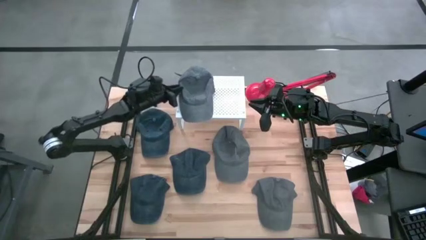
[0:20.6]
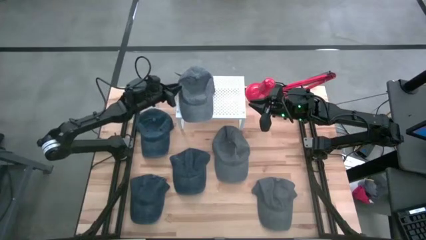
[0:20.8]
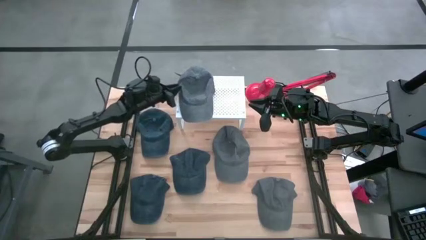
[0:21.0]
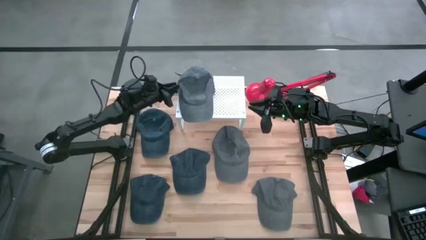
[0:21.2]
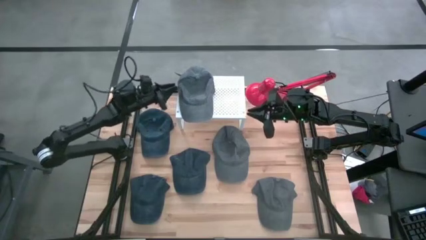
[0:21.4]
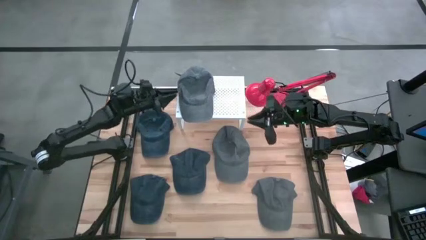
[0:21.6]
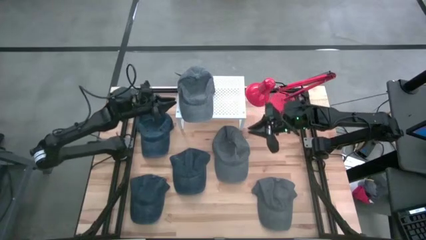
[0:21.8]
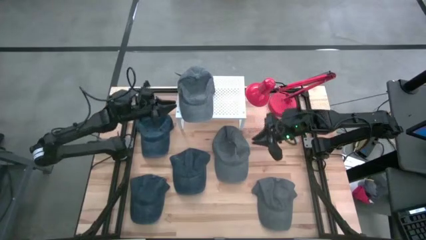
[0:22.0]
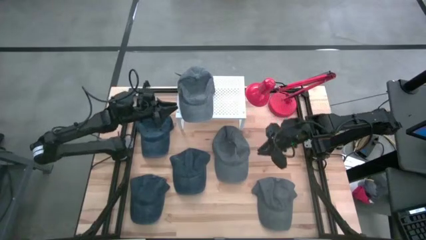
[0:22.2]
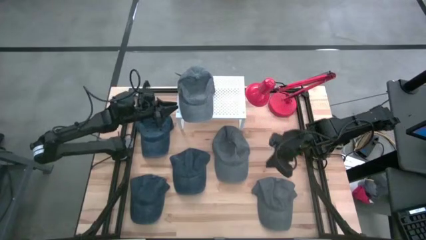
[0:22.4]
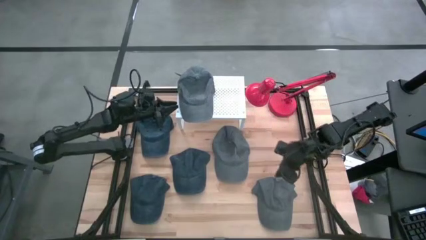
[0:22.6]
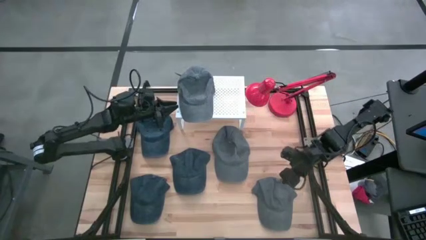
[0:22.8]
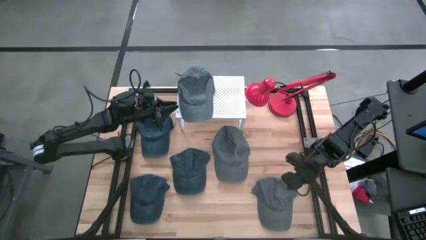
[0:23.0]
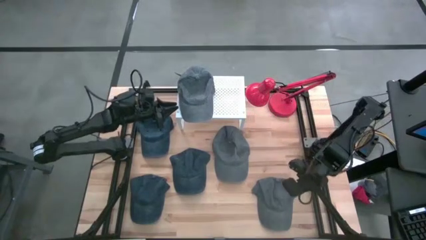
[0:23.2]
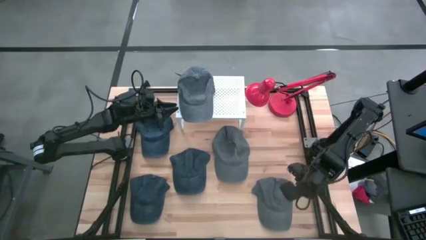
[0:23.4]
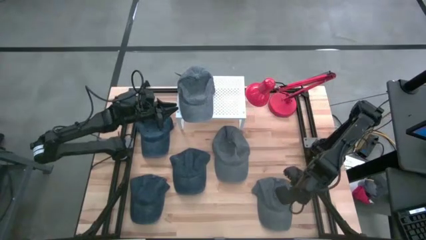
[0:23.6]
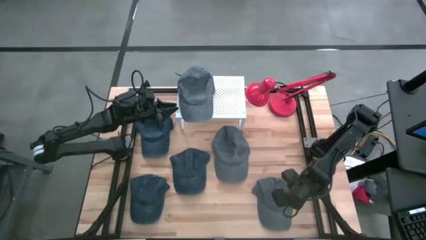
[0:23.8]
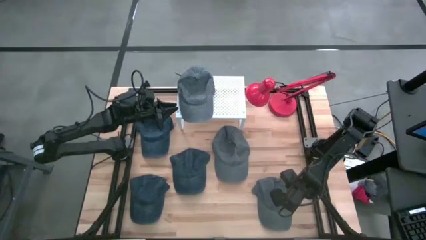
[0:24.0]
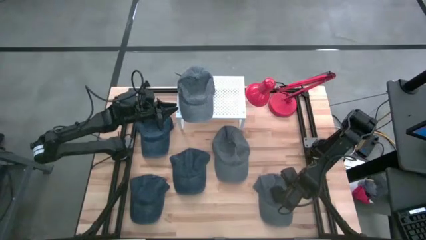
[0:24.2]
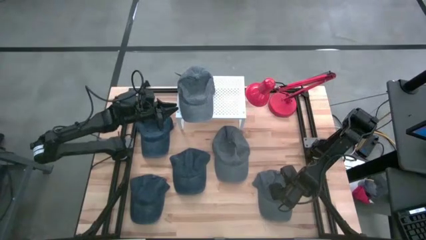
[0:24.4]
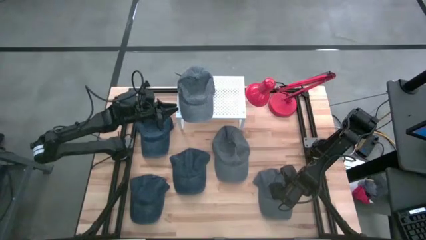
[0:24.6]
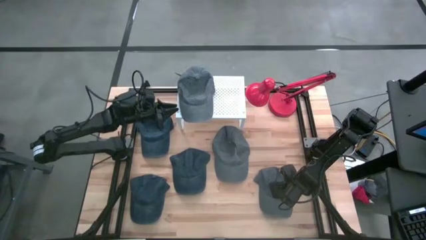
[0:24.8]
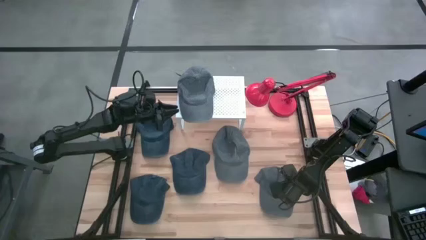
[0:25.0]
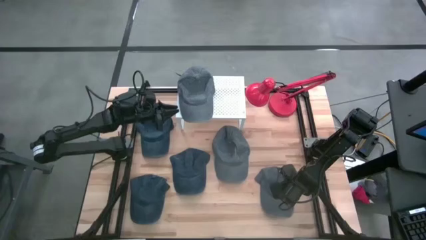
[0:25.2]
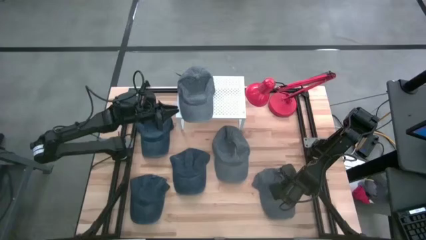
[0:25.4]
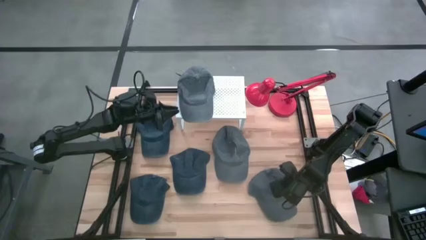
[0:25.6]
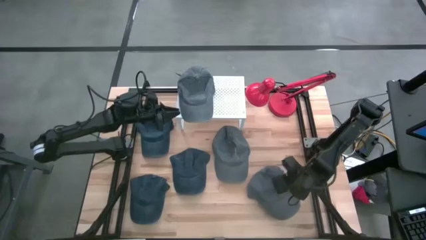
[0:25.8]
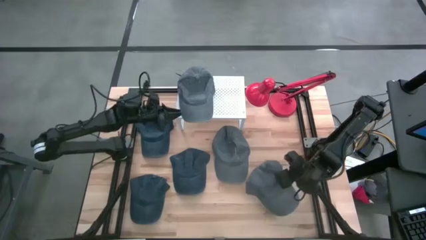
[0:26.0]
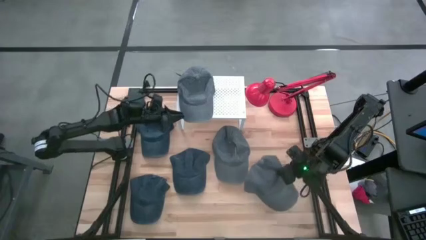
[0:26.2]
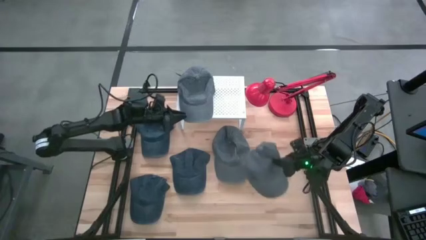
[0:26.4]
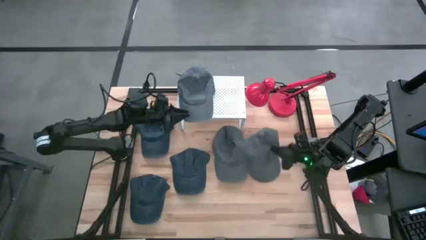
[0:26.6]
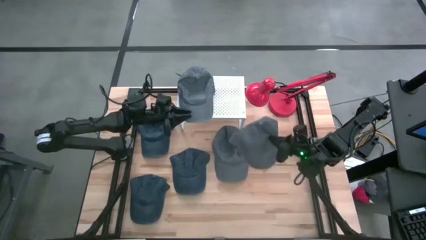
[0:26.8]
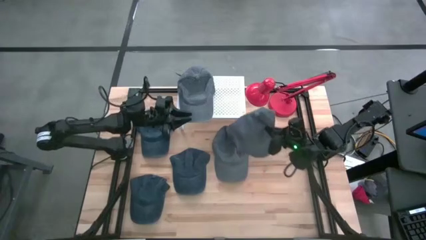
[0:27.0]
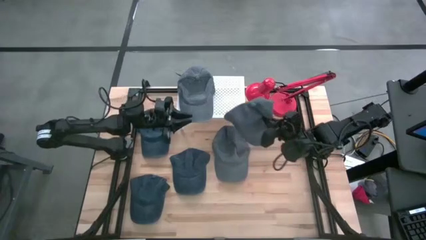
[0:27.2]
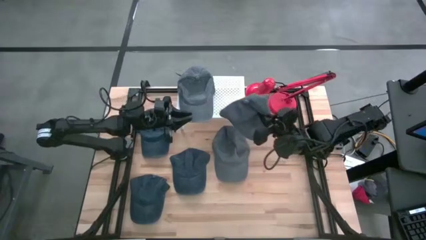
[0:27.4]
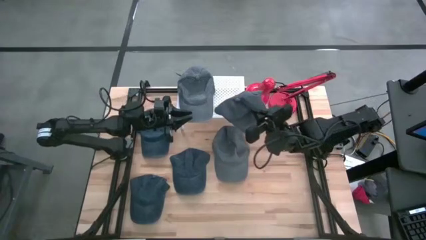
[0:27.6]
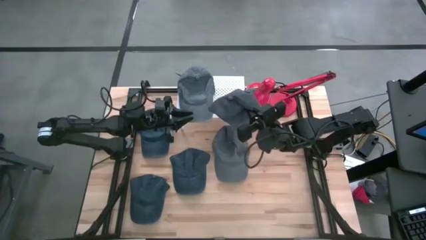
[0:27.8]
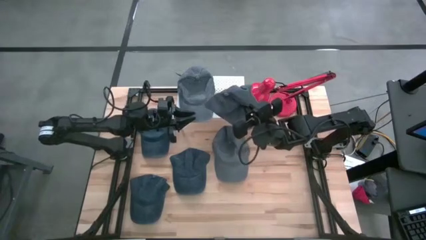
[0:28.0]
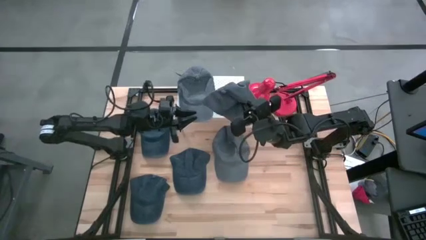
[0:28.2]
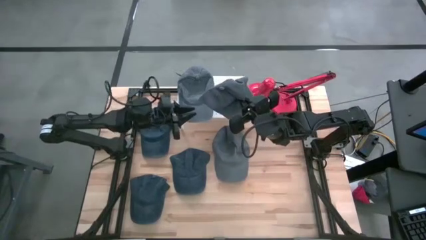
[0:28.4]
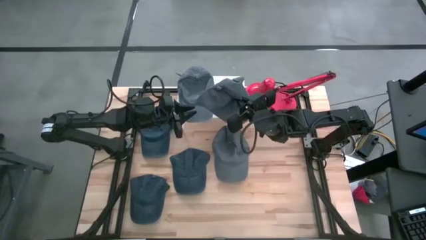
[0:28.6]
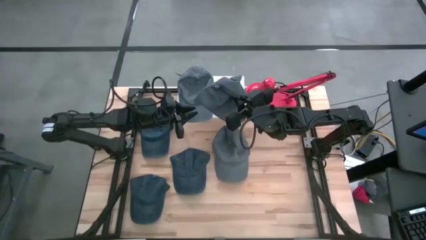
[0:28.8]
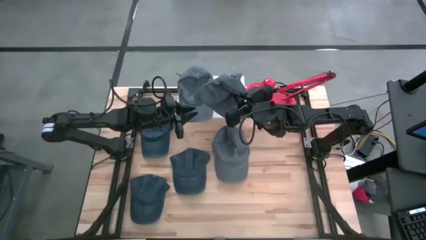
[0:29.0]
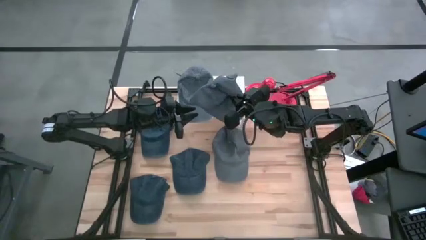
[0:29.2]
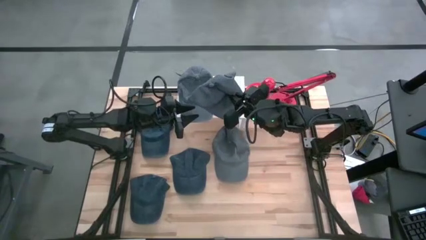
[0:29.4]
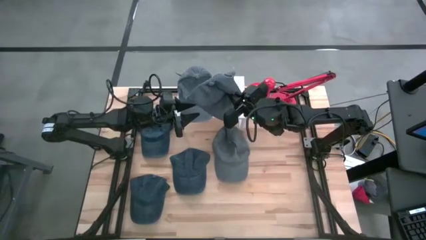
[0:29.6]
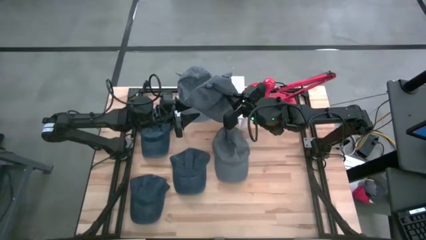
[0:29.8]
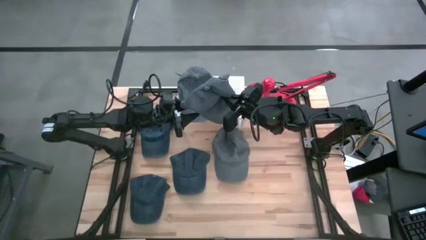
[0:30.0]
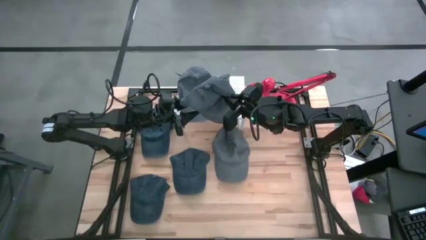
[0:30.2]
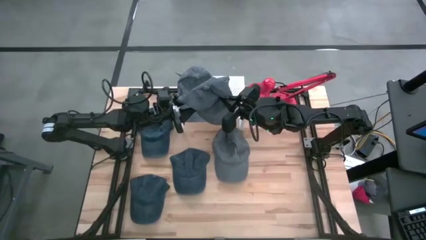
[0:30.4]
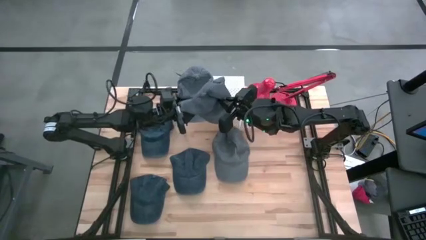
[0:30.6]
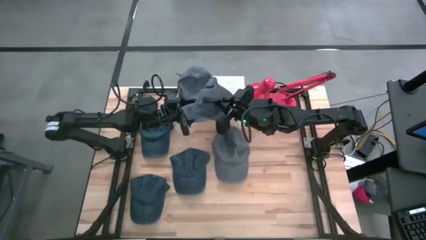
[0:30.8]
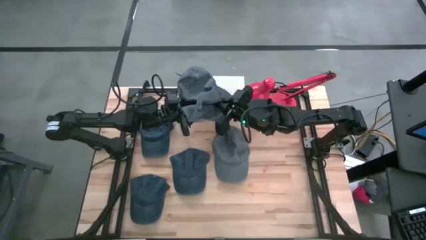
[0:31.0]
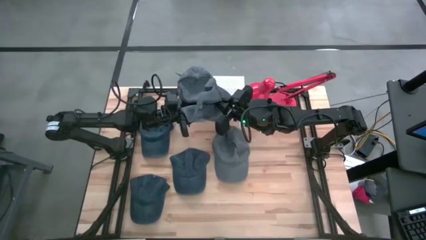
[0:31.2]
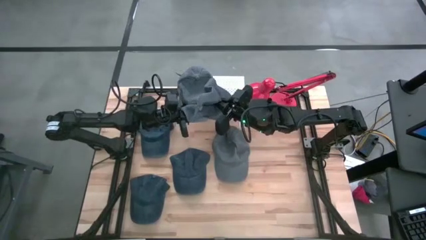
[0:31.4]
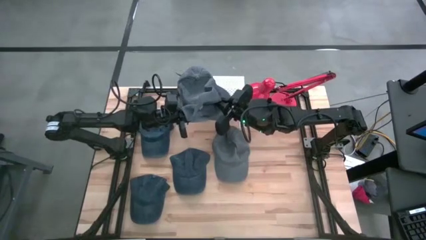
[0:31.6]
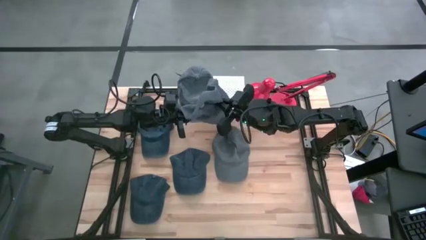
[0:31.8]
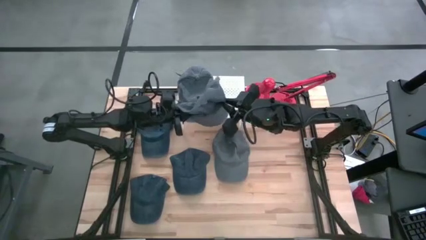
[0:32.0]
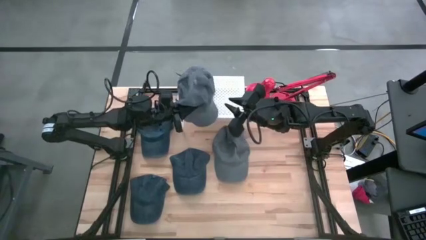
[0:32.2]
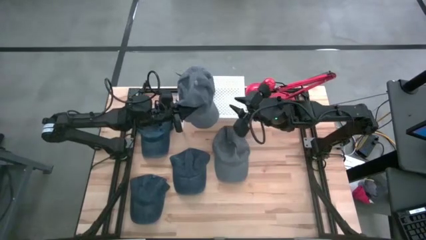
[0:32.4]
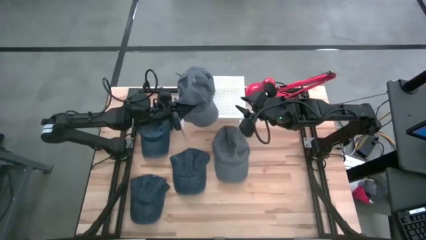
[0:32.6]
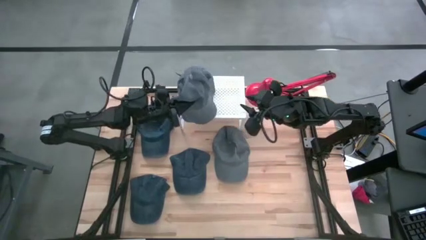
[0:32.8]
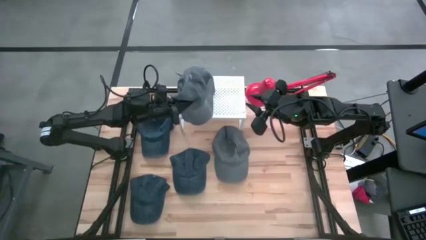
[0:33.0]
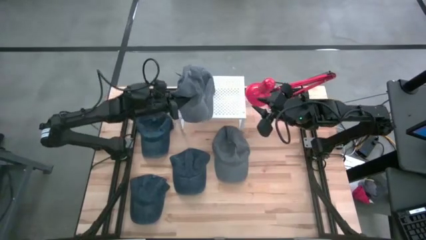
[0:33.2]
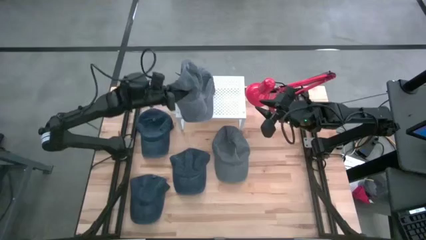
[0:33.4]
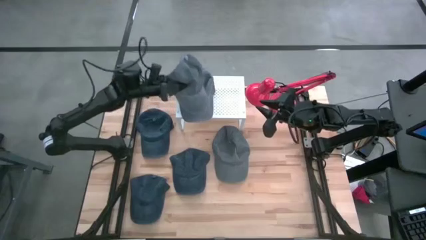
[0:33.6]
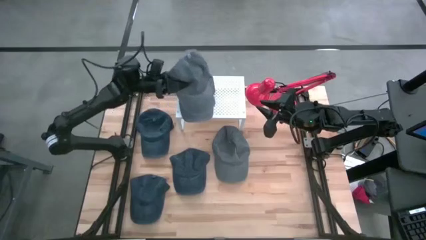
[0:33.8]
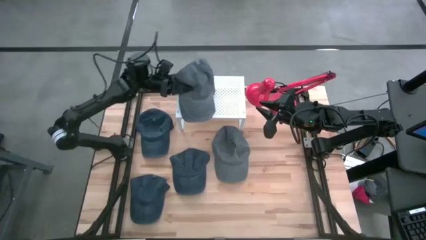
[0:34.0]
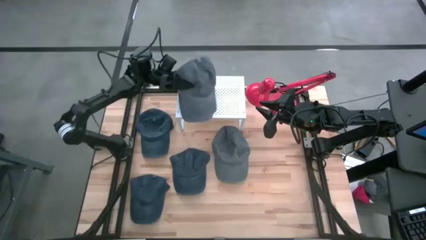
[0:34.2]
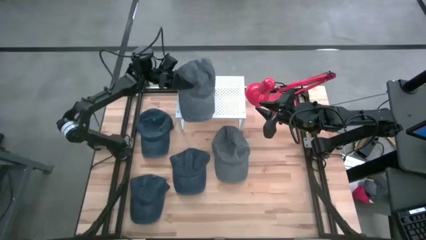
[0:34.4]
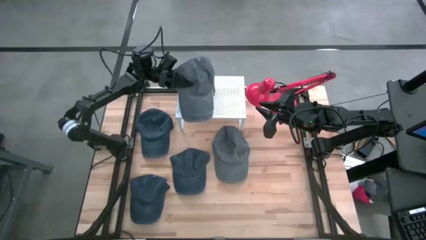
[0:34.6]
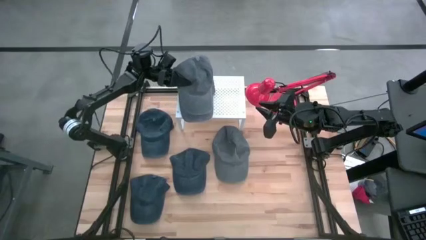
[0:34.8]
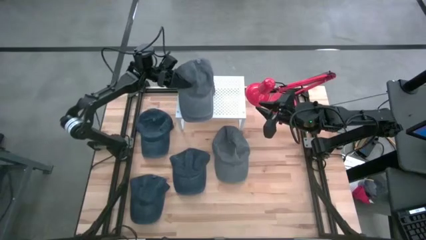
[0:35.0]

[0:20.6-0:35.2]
Task: Pick & Place hat
Stack the bottom gray cap on the gray cap on the shelf
